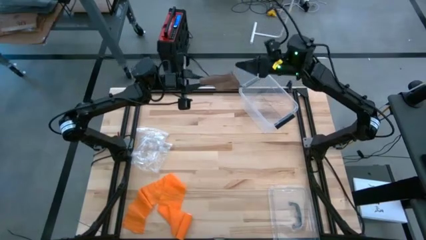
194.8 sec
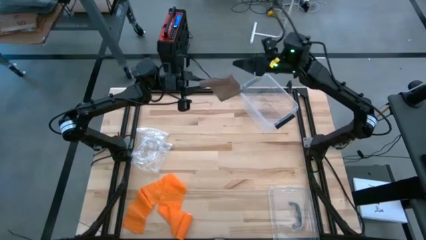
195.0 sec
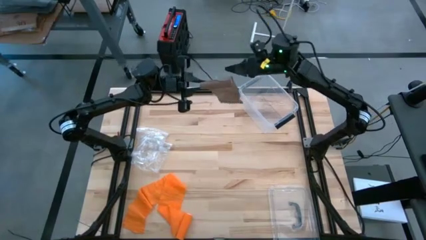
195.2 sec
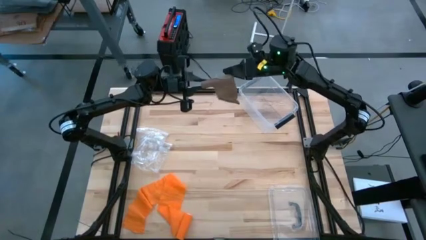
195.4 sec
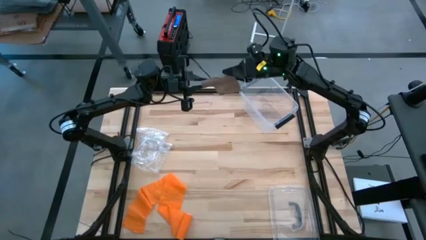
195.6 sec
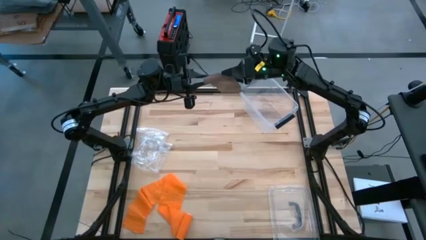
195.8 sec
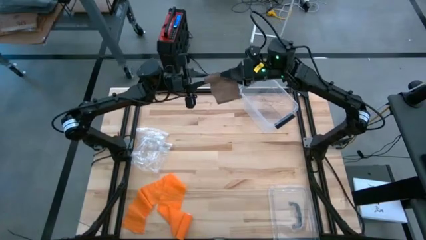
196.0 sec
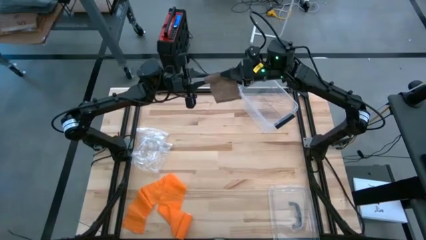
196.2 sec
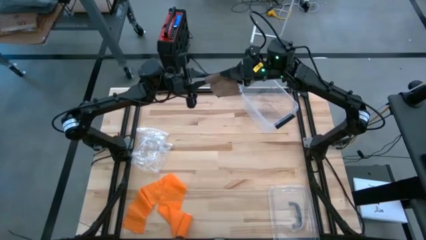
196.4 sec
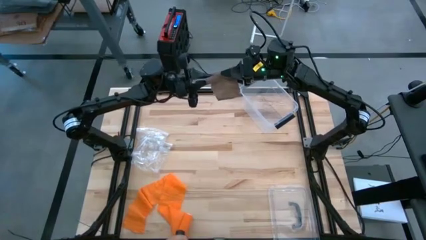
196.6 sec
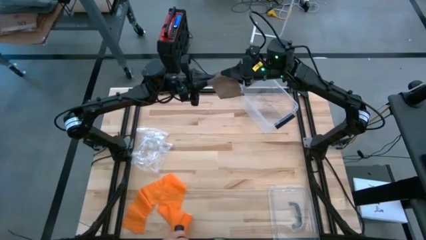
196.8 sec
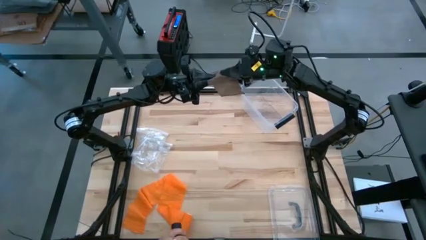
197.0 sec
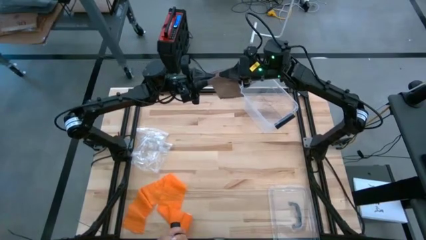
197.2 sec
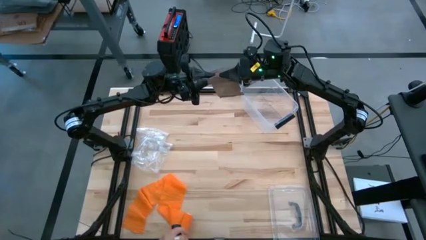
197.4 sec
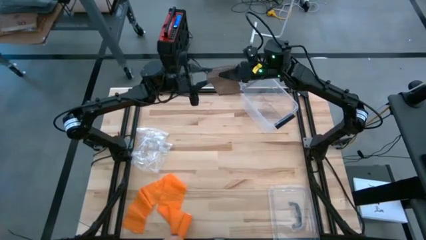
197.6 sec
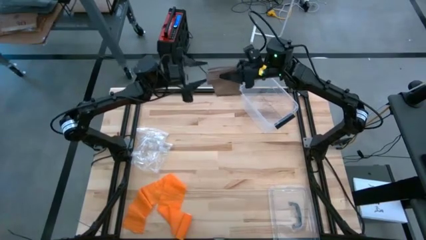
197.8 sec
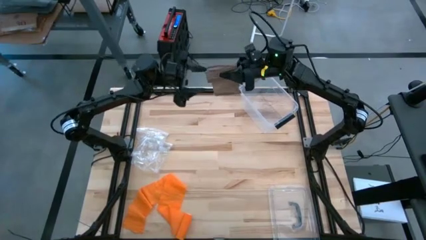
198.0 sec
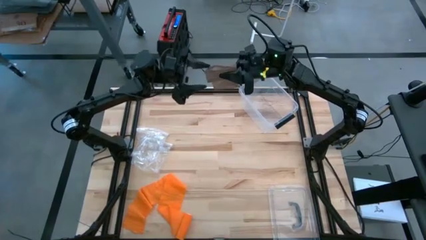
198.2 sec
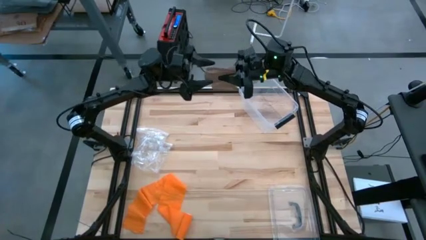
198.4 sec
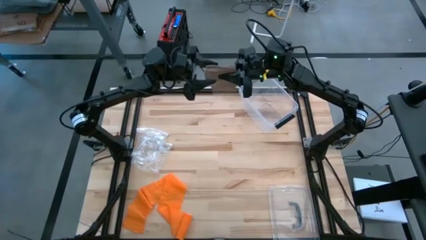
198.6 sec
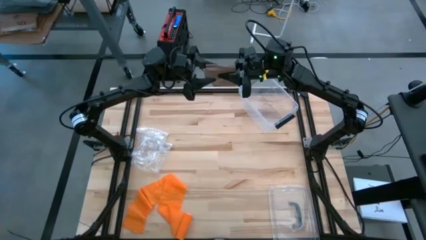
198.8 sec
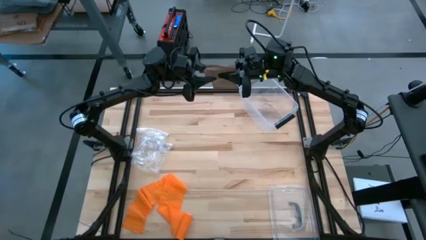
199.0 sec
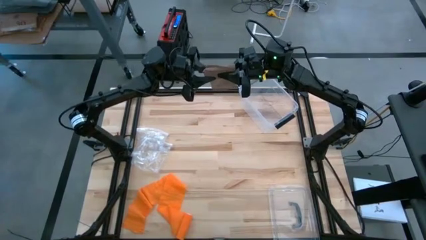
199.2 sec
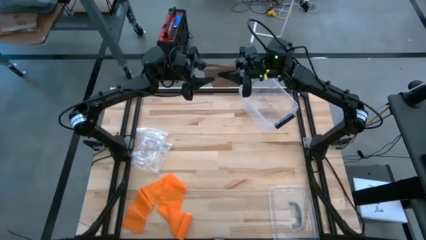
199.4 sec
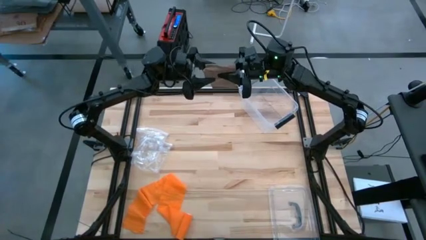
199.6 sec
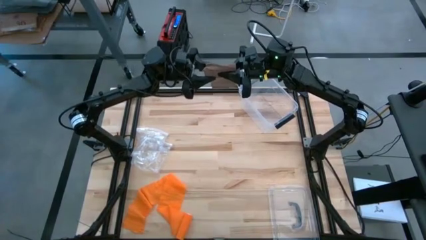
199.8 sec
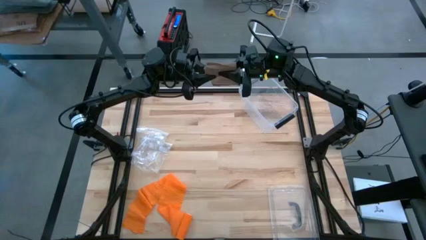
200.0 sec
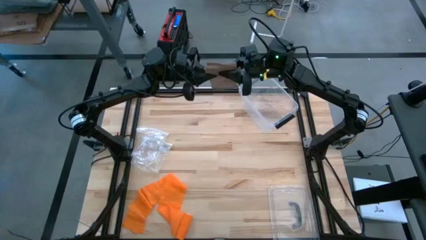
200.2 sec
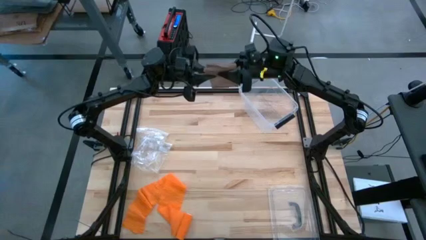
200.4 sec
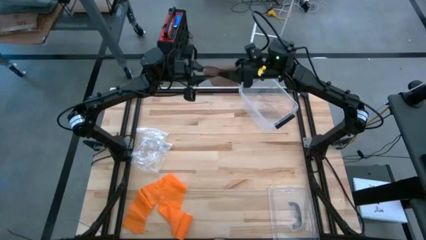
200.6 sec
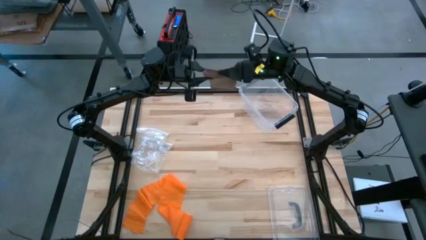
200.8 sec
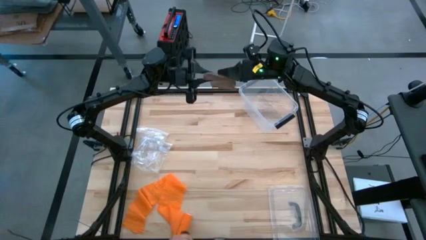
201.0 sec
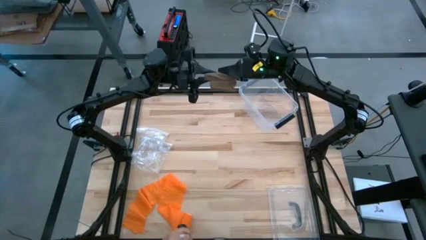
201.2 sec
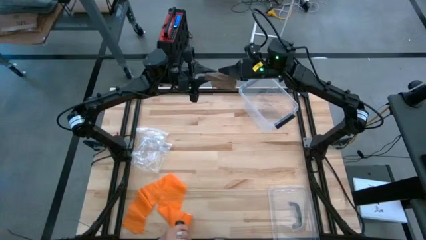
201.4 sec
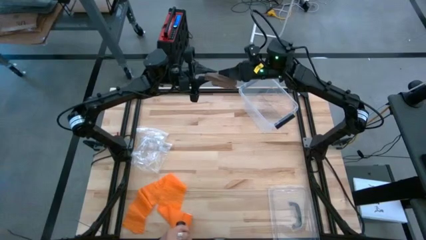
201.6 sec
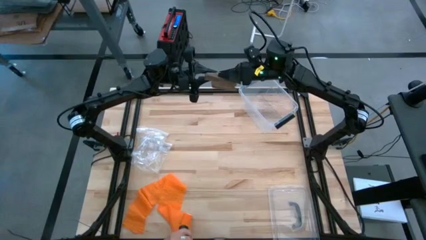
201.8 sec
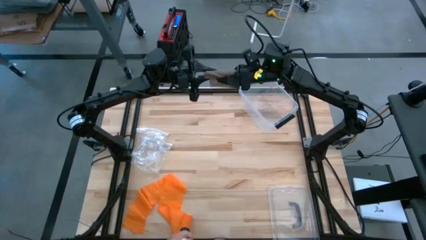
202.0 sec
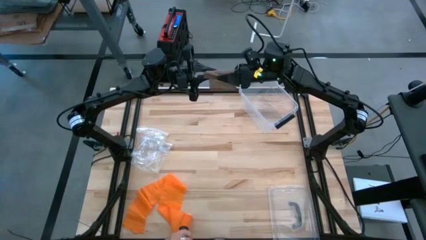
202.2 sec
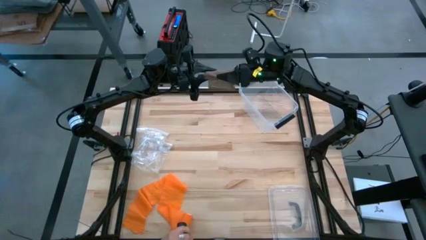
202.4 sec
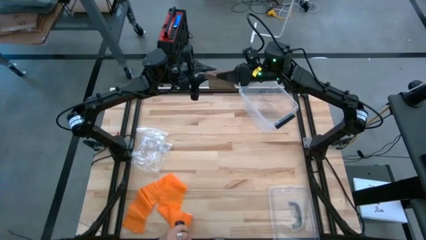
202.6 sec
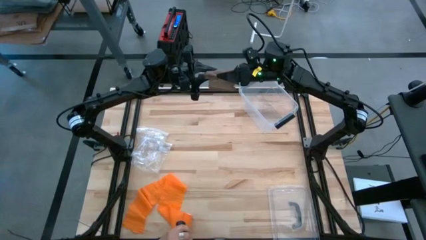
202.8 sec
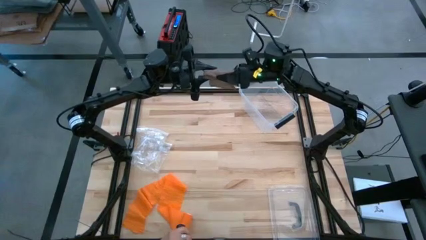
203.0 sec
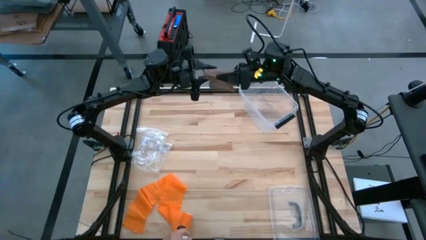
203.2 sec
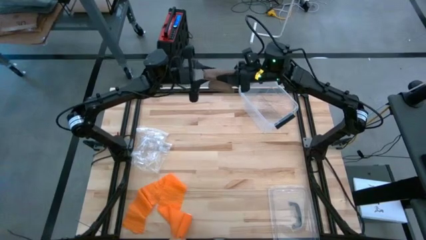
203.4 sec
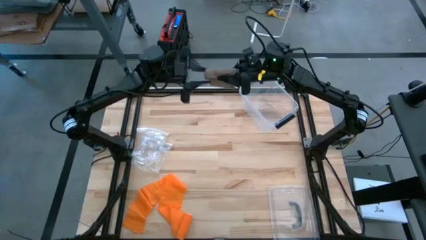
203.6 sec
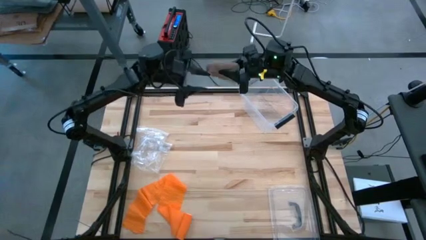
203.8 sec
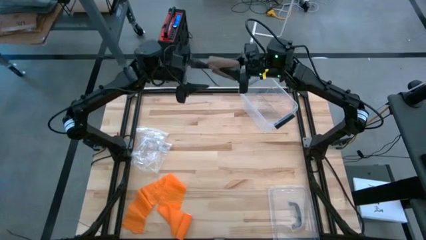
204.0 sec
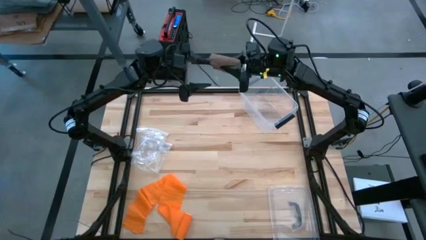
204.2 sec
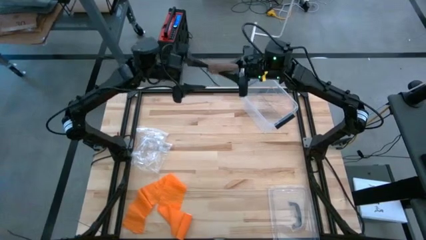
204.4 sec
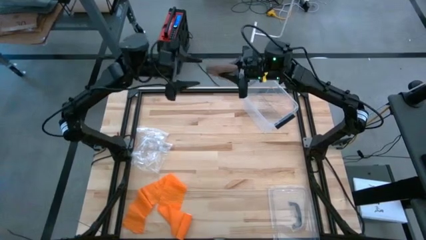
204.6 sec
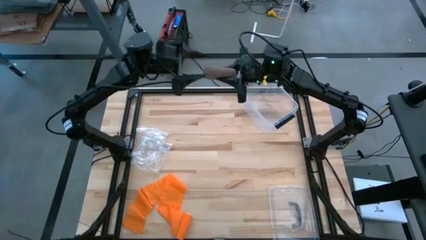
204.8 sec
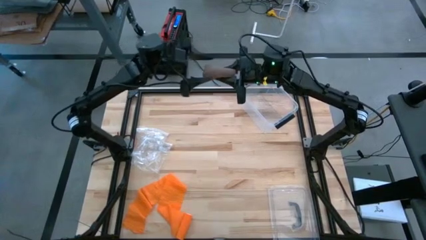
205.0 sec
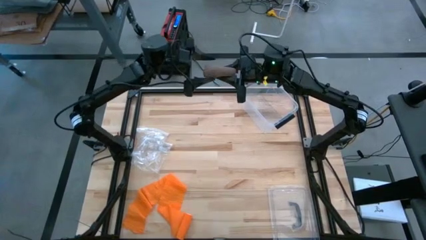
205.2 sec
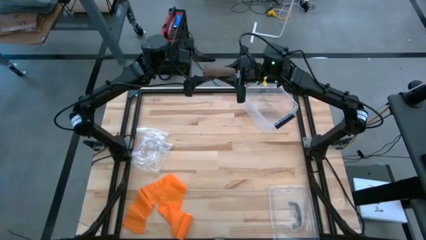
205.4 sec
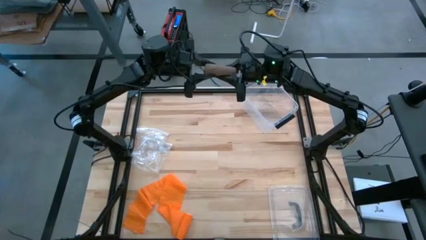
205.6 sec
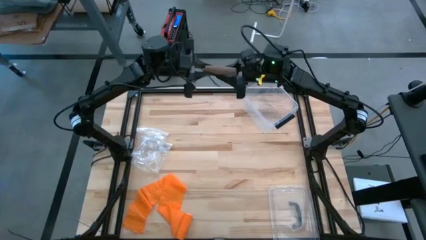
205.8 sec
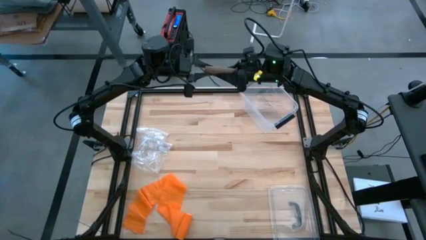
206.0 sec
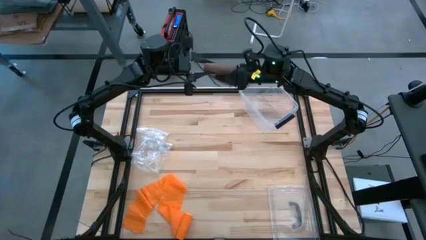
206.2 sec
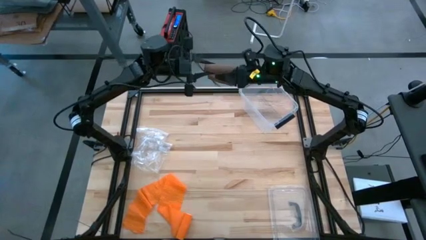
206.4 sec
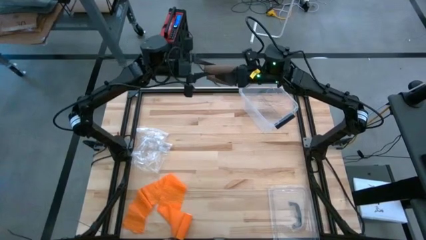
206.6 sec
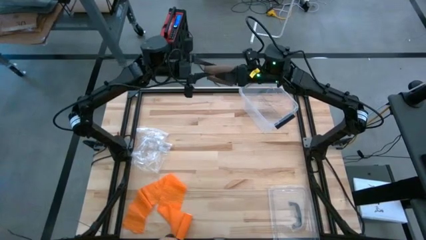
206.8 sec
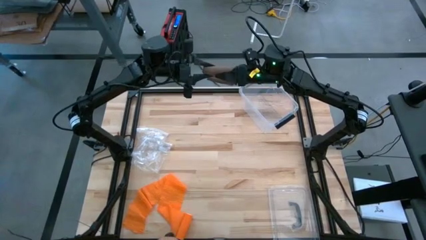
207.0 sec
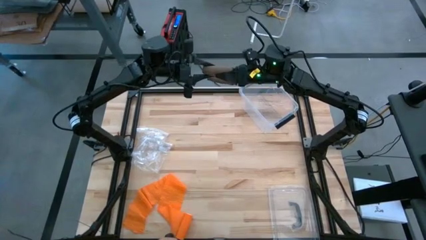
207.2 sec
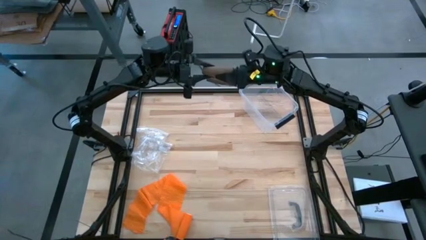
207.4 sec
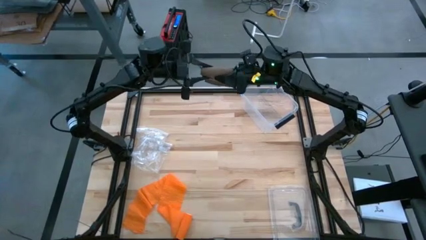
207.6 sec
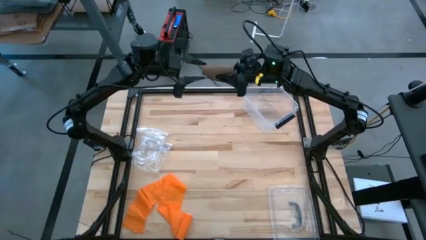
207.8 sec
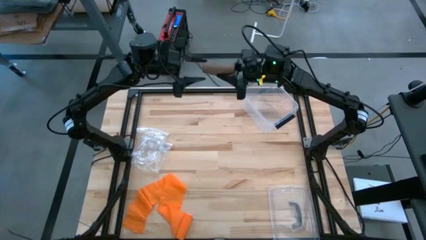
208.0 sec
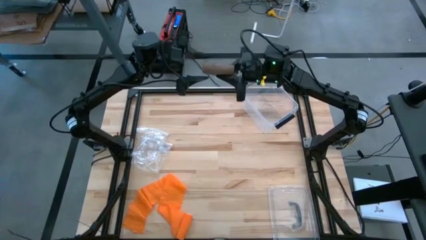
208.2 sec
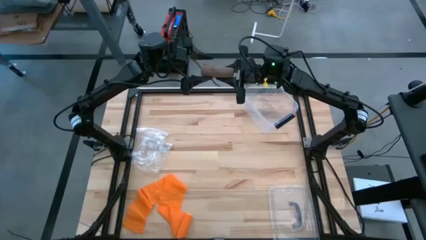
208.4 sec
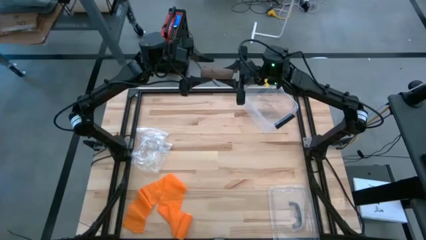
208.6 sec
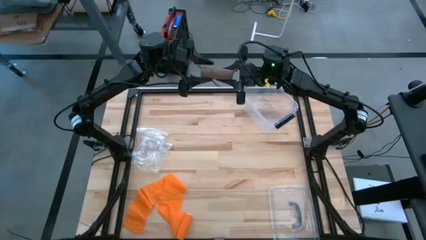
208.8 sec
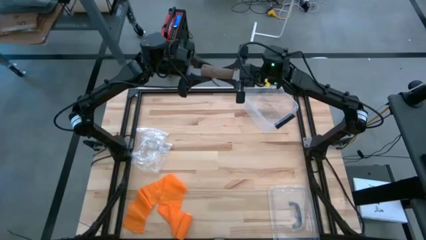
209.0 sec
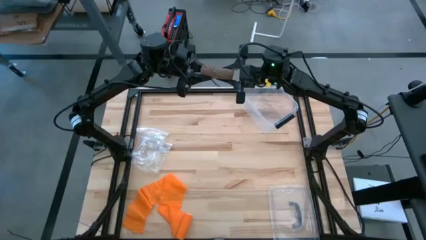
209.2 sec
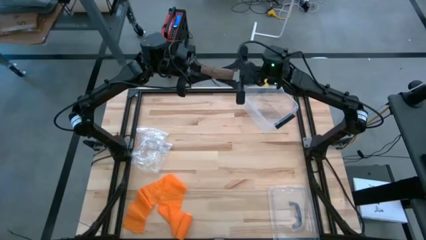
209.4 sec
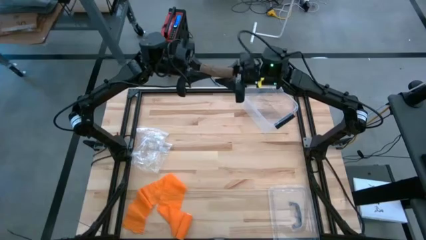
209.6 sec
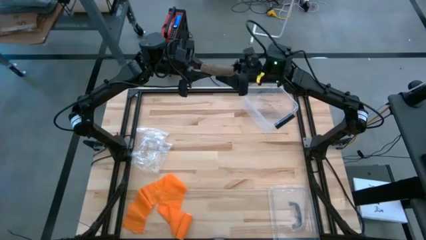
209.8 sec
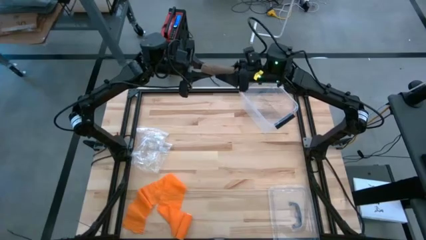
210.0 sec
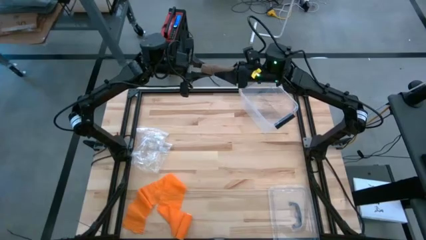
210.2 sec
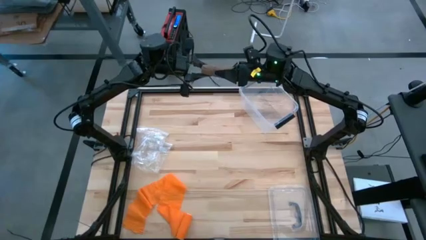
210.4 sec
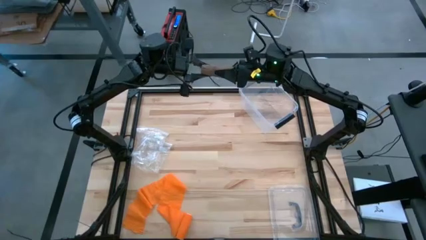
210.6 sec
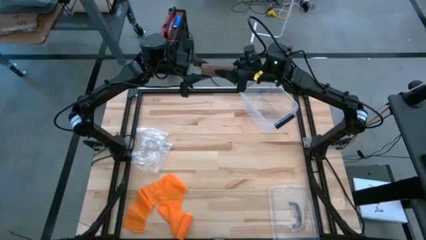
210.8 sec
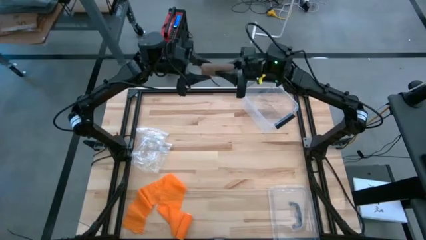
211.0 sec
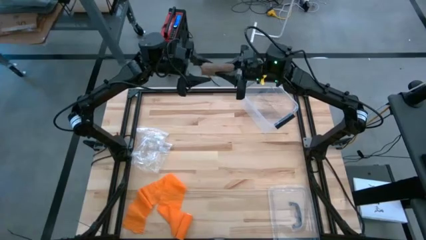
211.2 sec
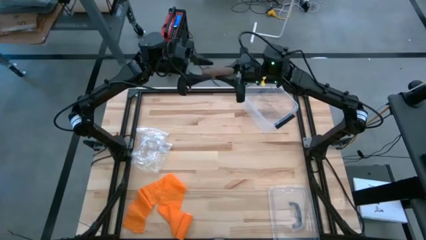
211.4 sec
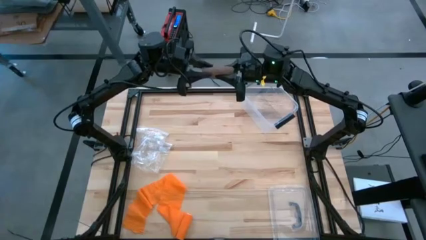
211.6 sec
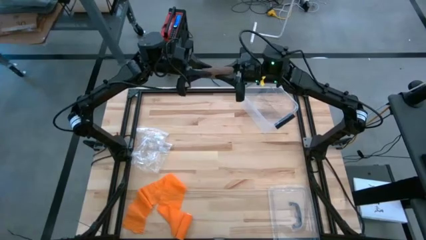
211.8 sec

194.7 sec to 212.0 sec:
Task: Roll bandage
Roll the brown bandage
